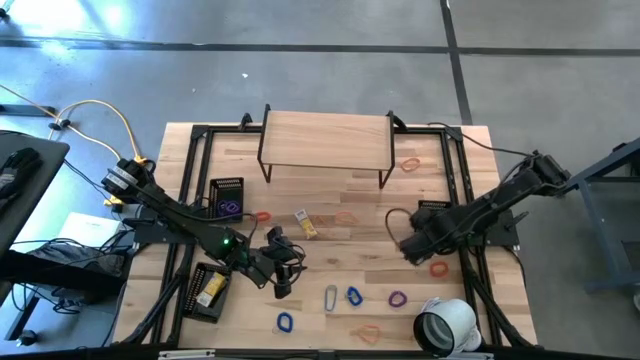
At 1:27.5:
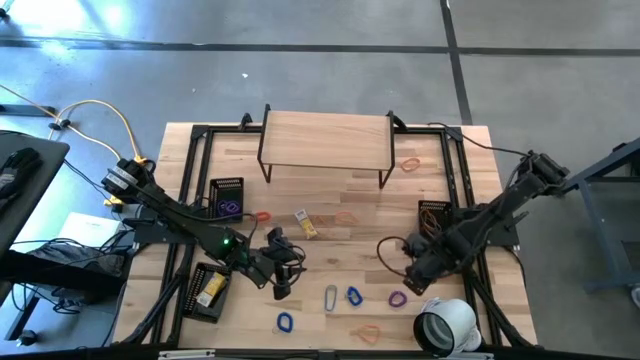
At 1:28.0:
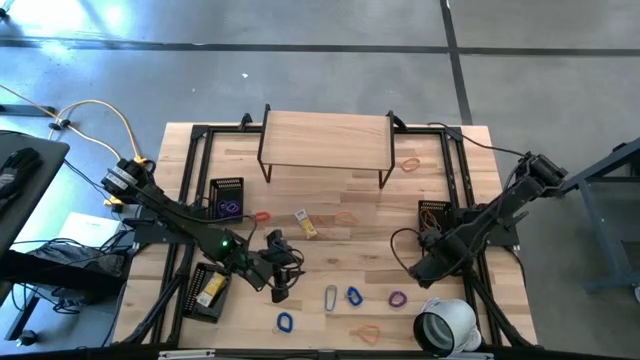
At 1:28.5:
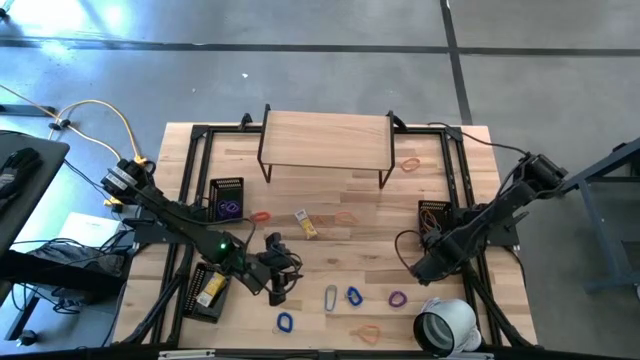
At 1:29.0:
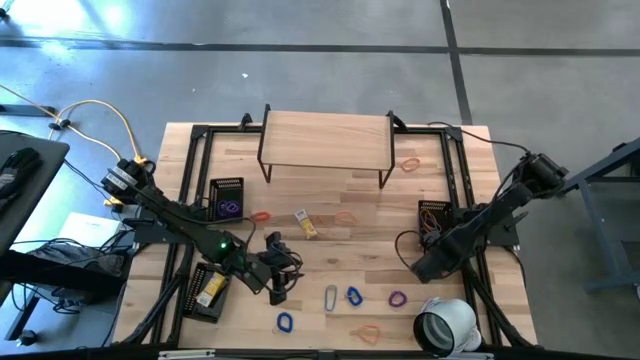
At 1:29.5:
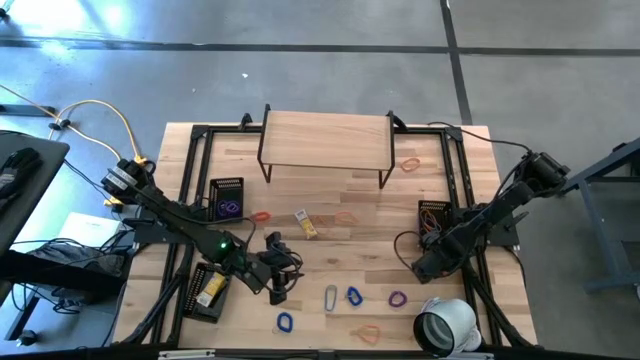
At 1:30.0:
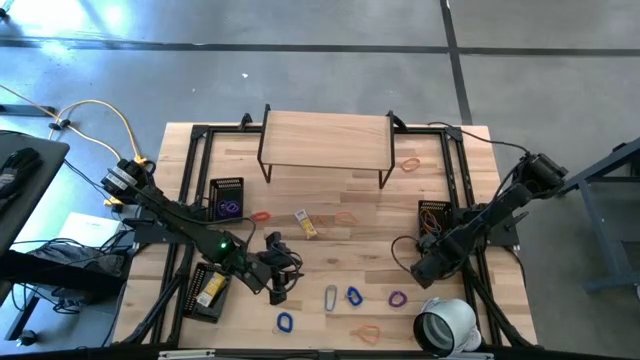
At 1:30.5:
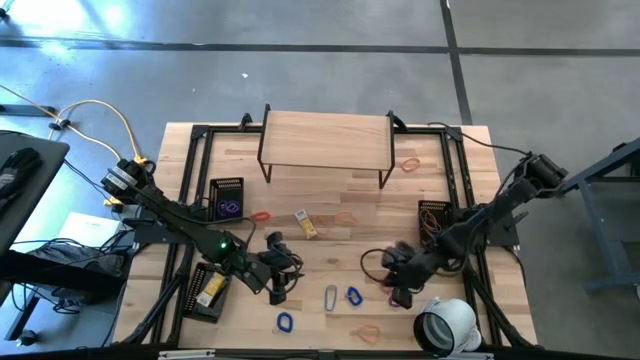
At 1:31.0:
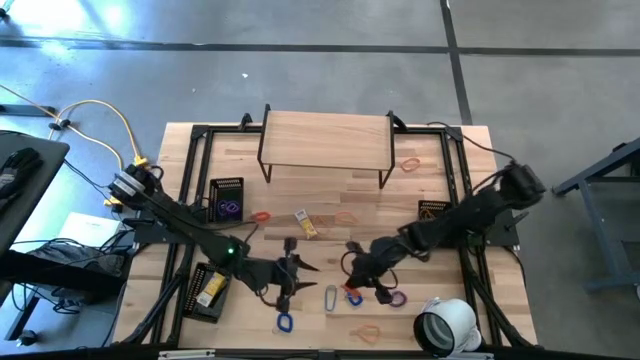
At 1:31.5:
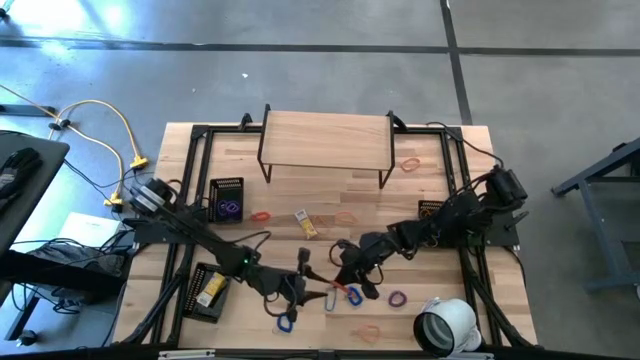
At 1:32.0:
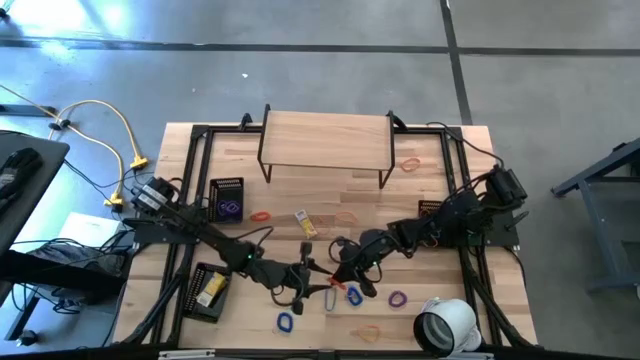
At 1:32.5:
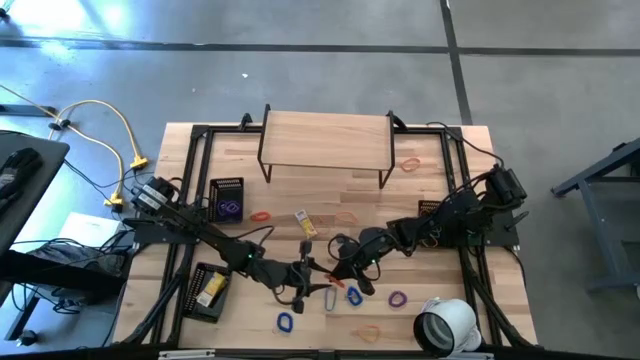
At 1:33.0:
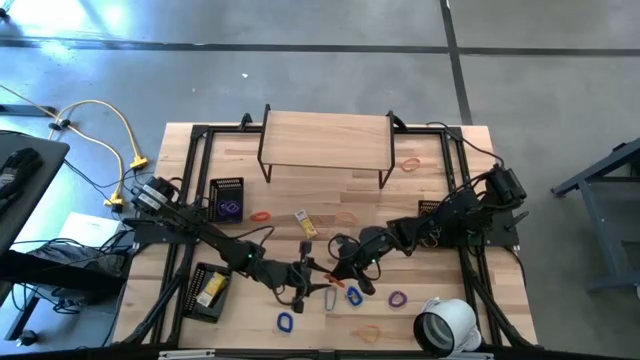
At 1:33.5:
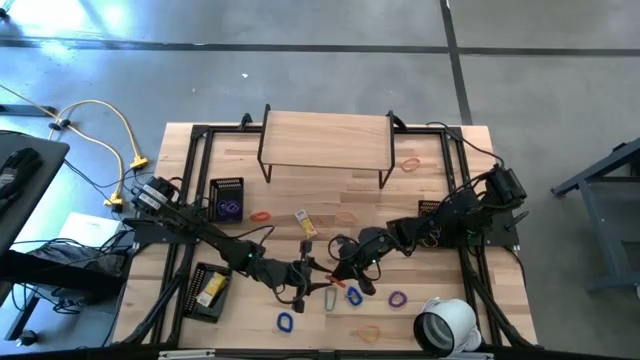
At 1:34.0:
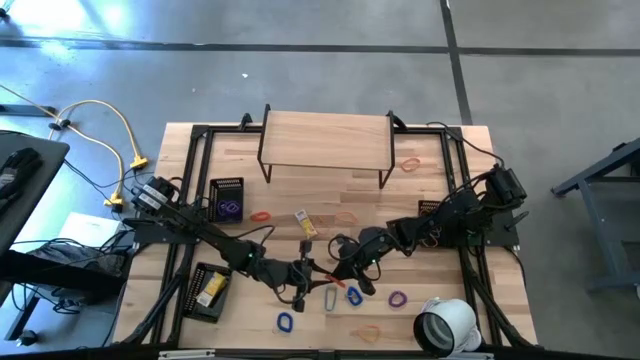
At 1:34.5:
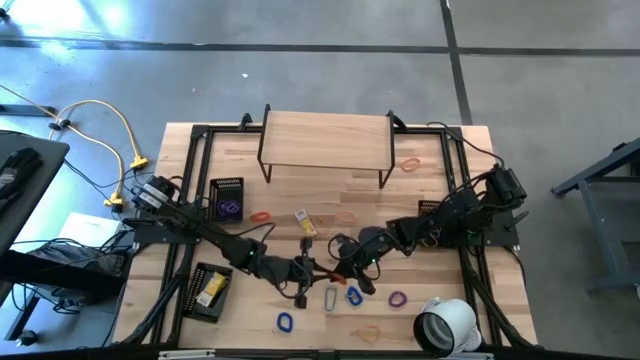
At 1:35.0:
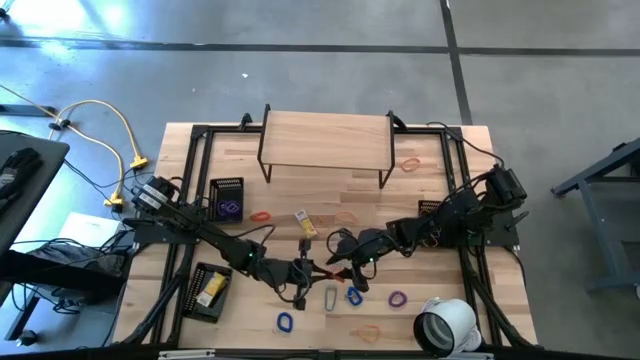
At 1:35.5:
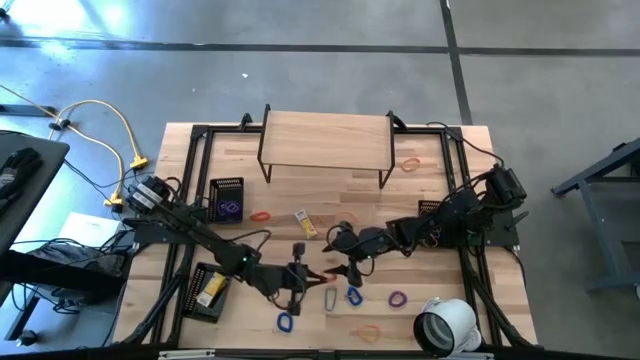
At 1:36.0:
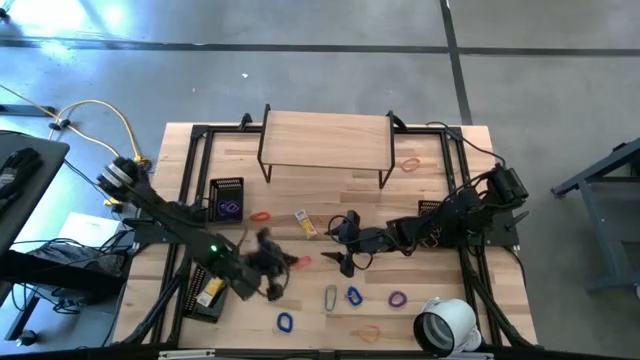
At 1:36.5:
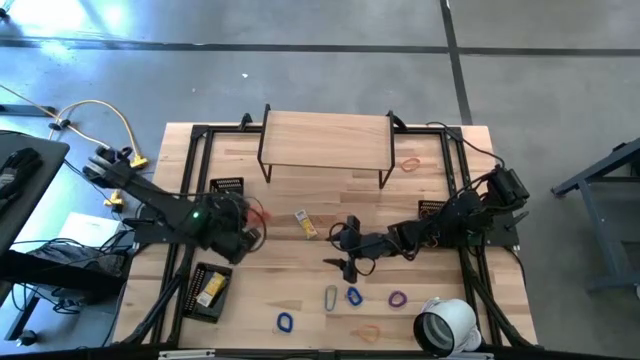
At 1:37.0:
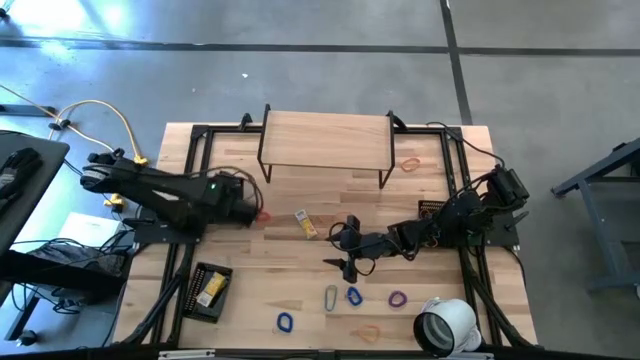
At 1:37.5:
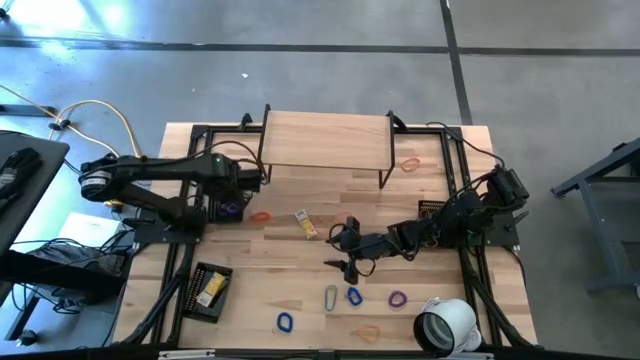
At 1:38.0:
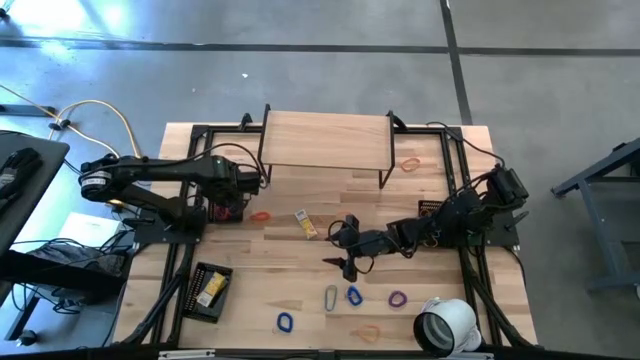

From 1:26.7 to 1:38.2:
Task: Pick & Place Office Desk Supplies
Put the right orange spring keychain into the top left black bin

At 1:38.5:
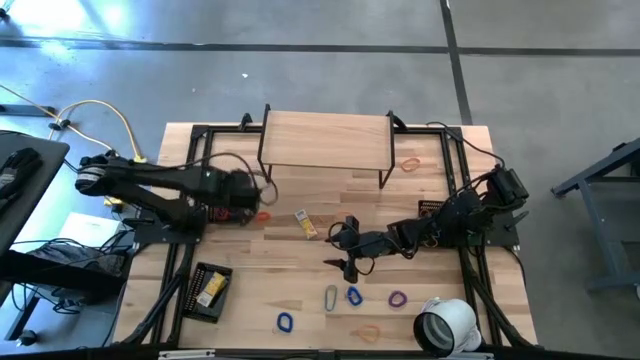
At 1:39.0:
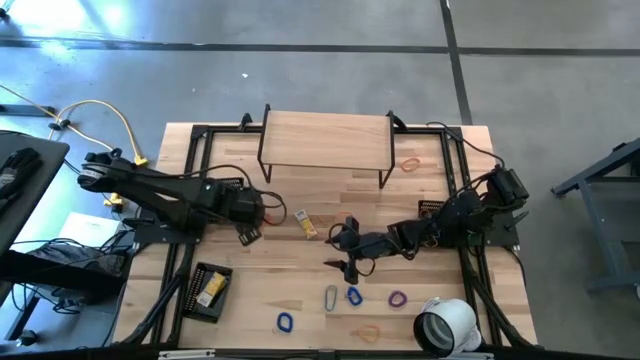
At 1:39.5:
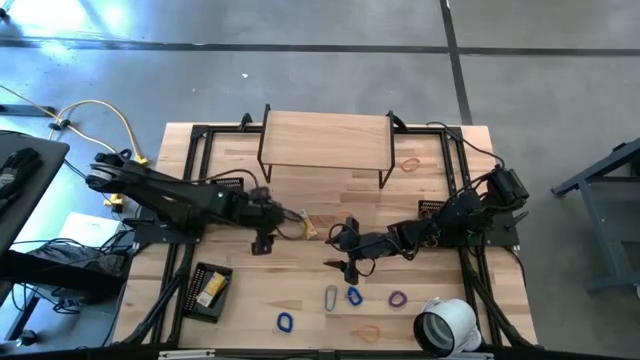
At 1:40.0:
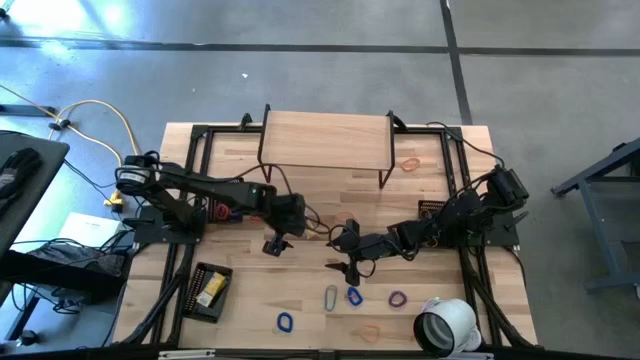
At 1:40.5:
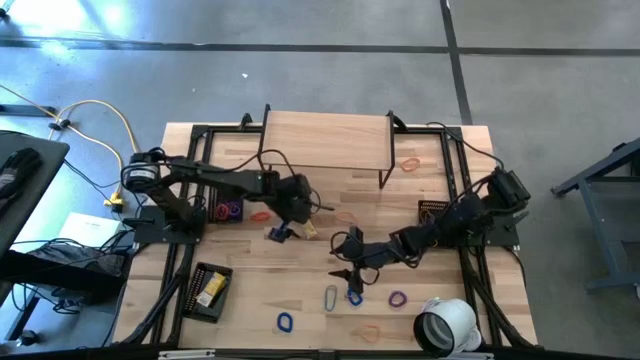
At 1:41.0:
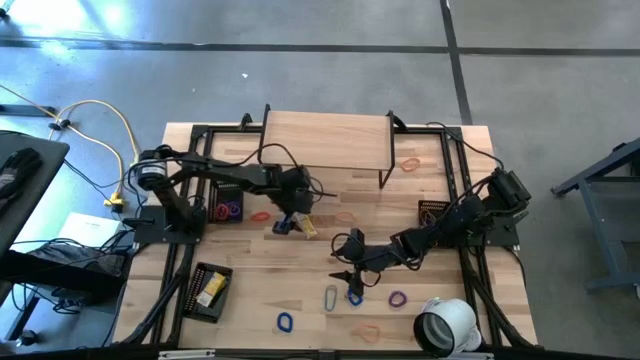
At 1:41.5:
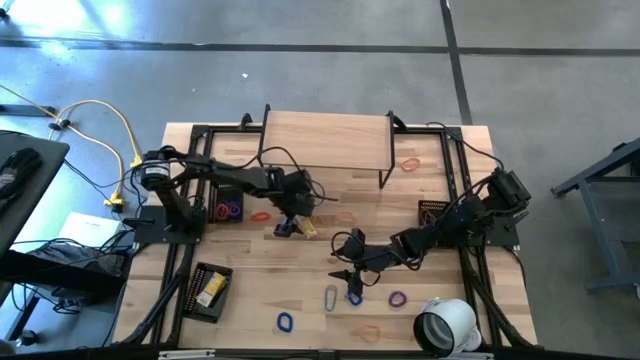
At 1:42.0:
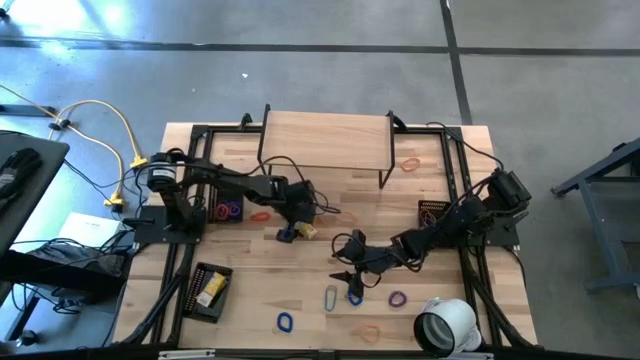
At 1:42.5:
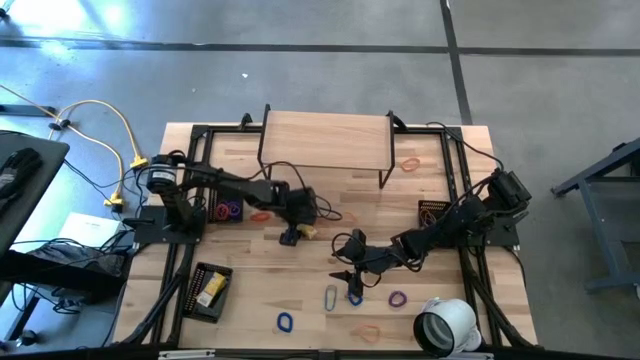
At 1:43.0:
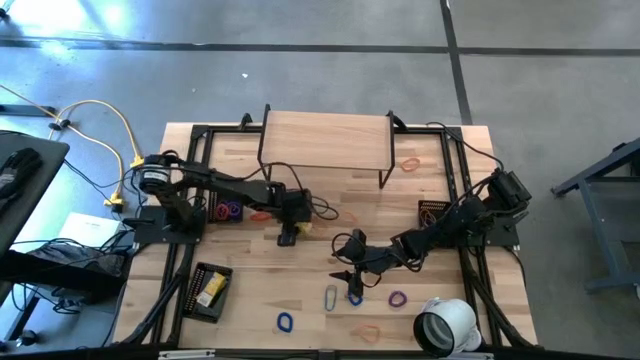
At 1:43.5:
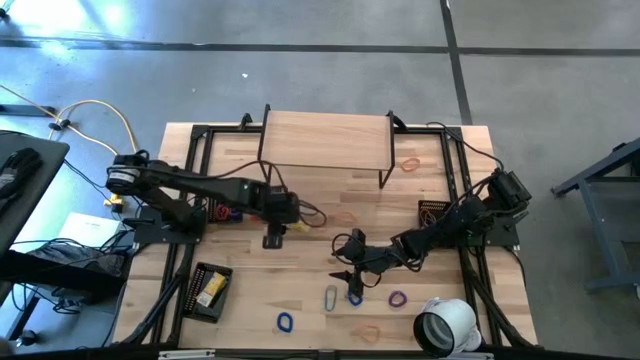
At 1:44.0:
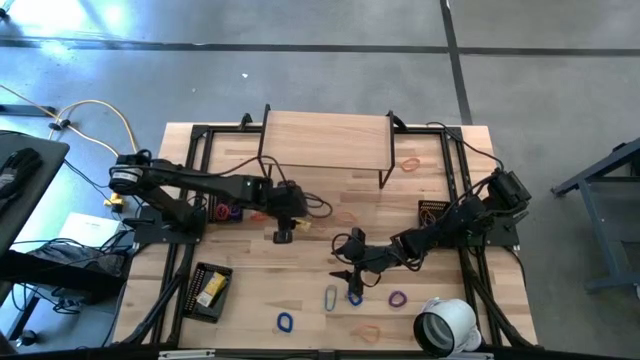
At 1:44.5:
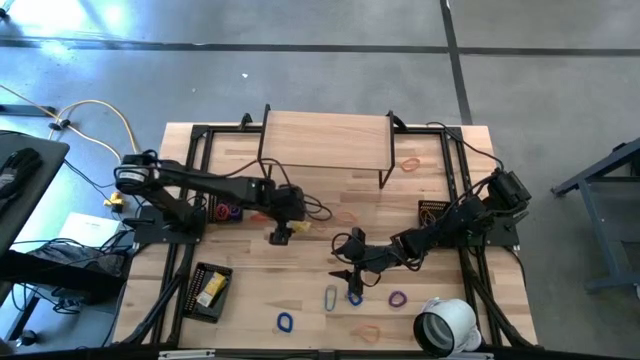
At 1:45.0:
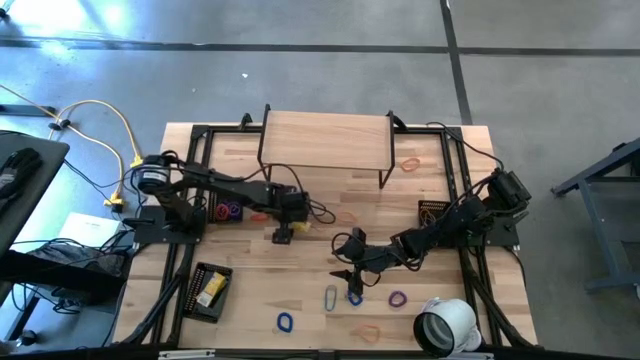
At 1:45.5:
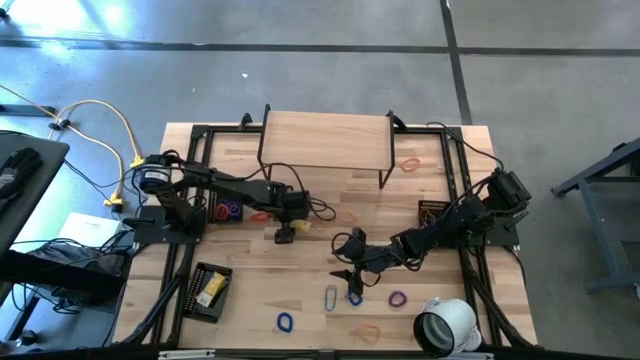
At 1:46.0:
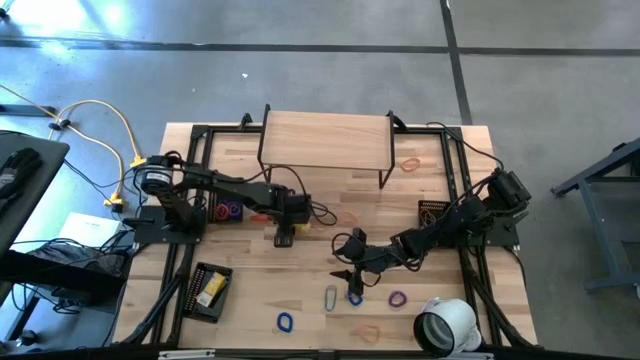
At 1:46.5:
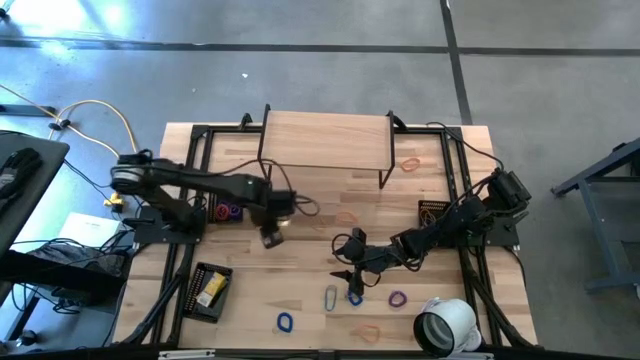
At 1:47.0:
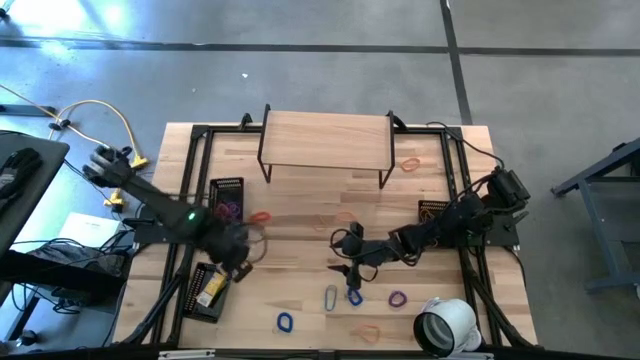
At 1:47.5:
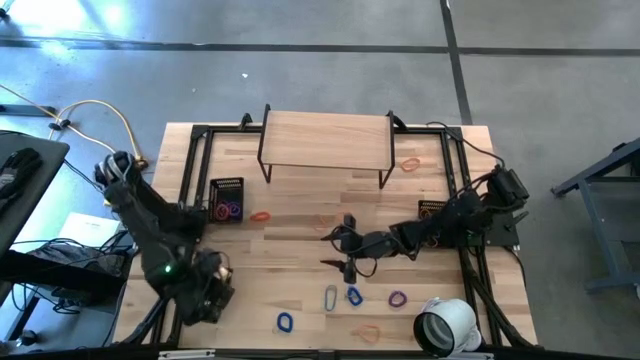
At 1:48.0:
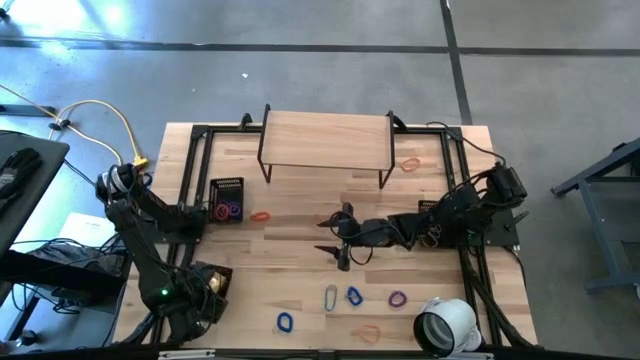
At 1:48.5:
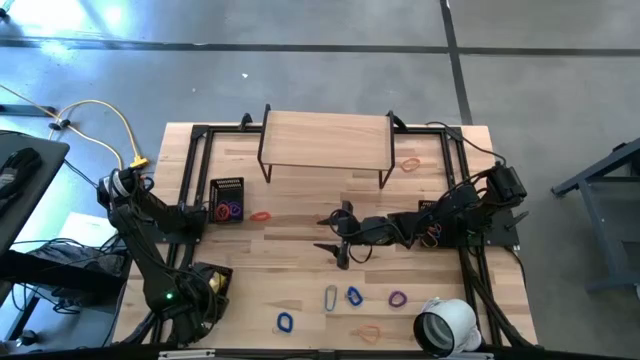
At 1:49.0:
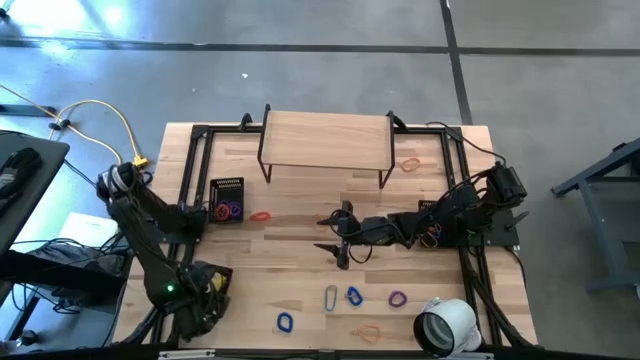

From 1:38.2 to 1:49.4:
Put the yellow crayon box into the bottom black bin
